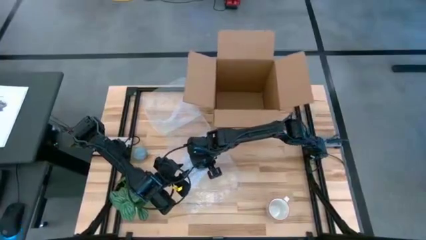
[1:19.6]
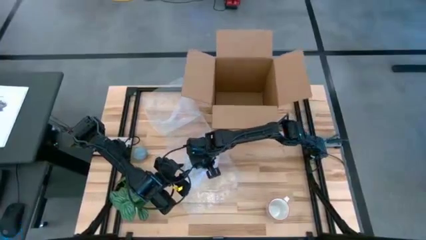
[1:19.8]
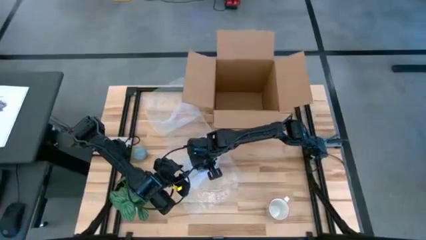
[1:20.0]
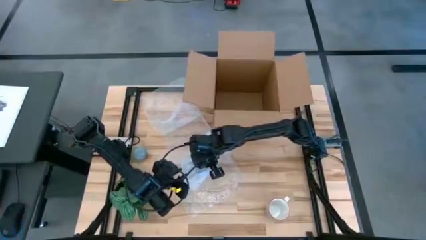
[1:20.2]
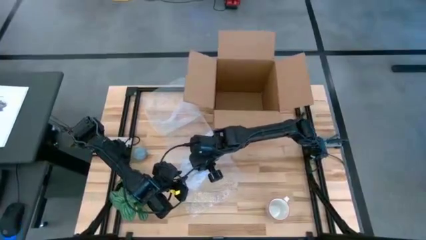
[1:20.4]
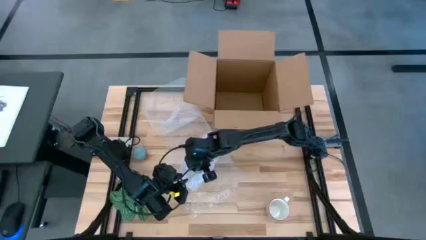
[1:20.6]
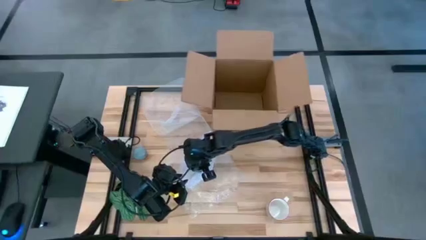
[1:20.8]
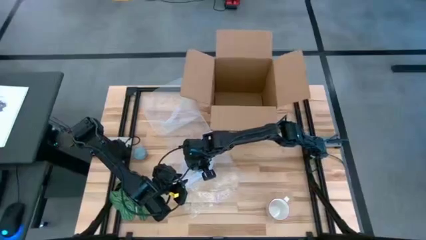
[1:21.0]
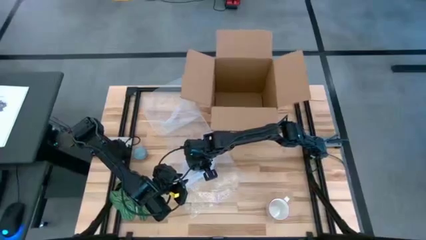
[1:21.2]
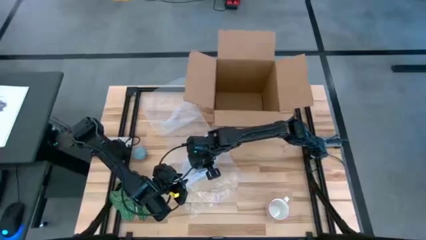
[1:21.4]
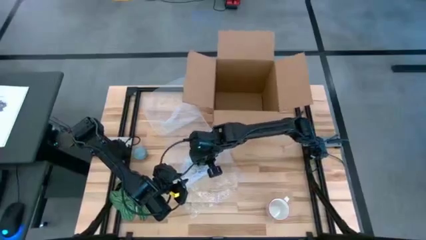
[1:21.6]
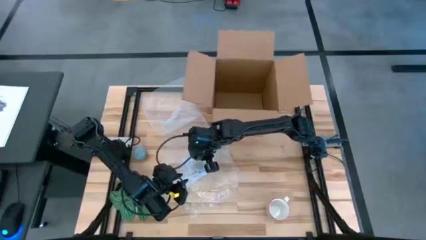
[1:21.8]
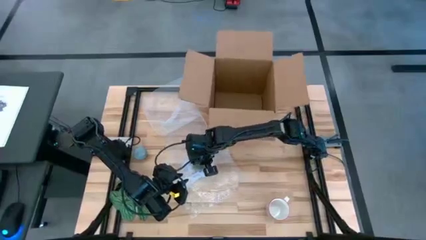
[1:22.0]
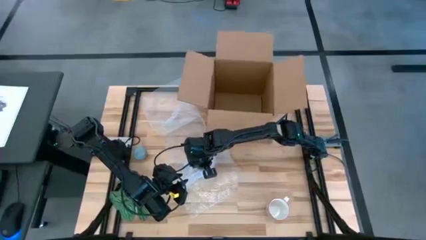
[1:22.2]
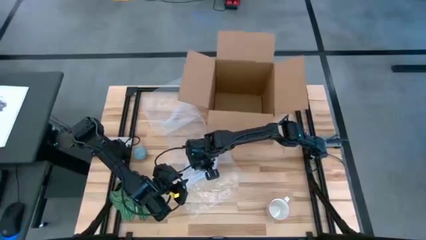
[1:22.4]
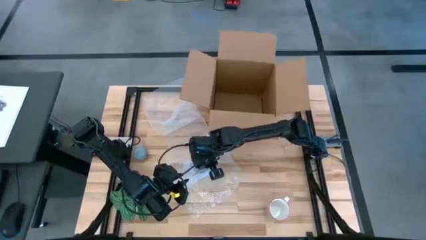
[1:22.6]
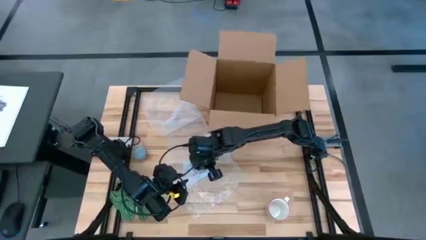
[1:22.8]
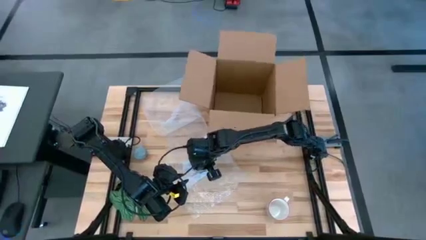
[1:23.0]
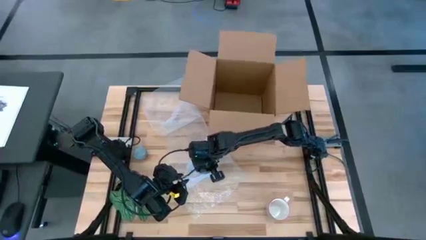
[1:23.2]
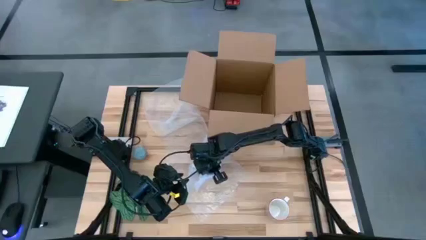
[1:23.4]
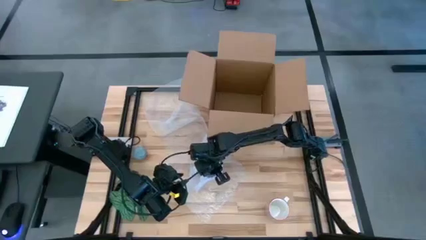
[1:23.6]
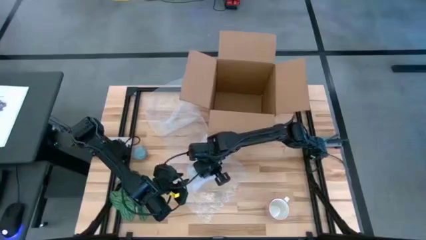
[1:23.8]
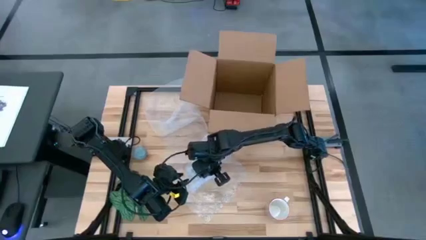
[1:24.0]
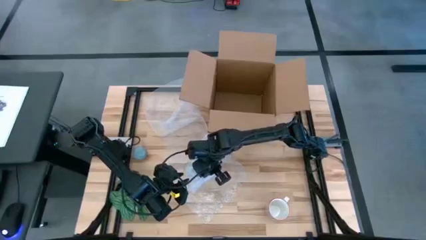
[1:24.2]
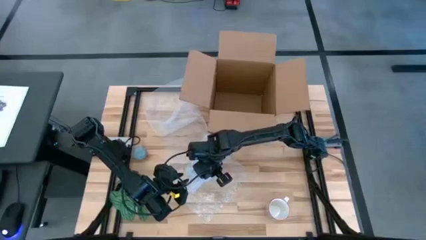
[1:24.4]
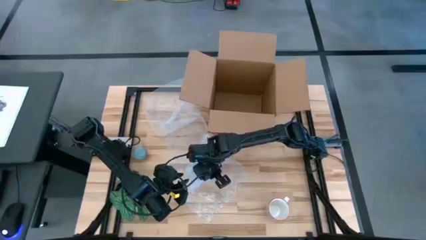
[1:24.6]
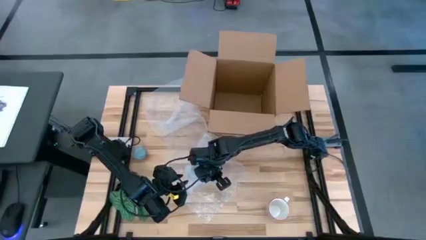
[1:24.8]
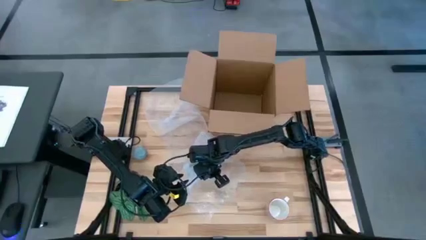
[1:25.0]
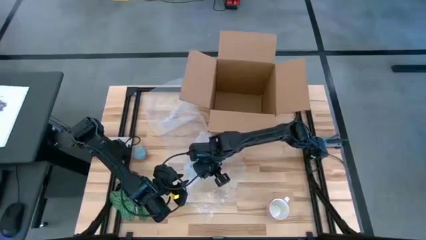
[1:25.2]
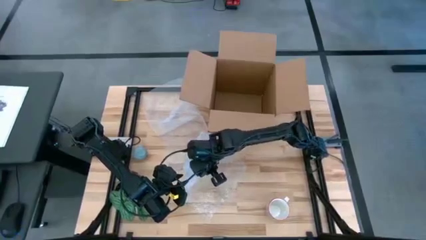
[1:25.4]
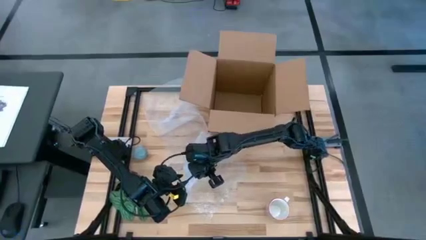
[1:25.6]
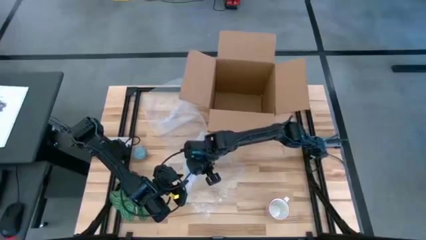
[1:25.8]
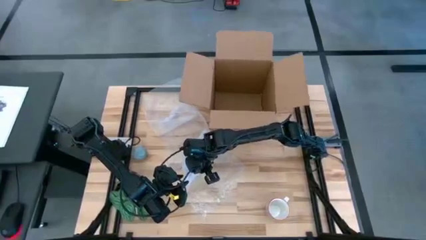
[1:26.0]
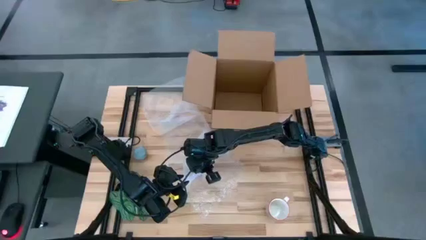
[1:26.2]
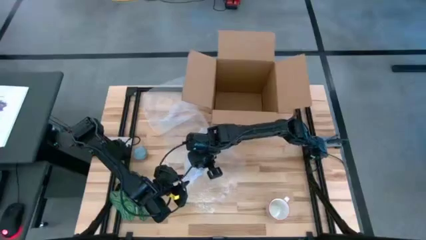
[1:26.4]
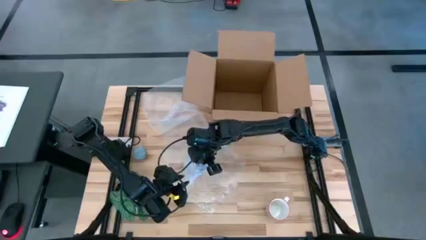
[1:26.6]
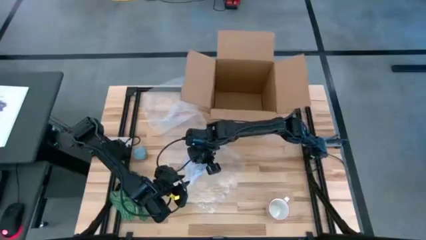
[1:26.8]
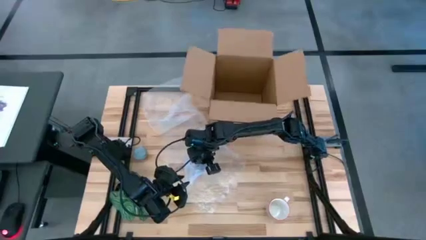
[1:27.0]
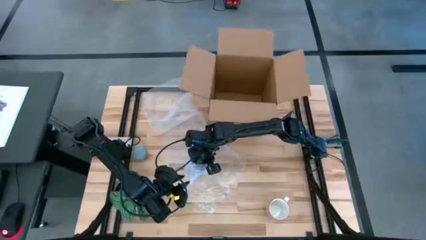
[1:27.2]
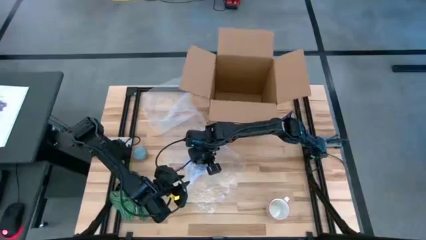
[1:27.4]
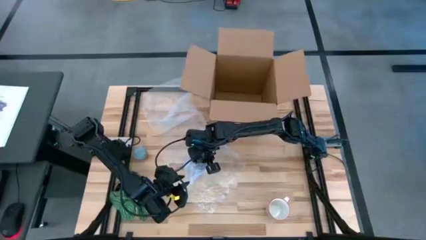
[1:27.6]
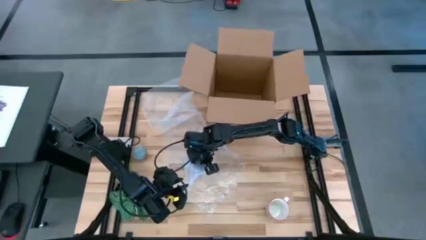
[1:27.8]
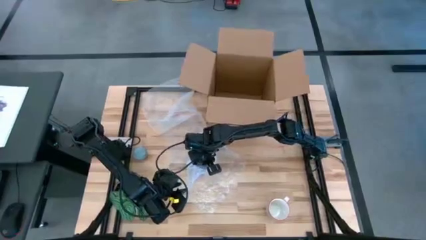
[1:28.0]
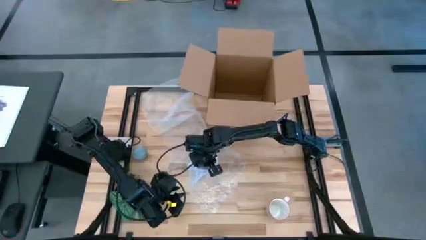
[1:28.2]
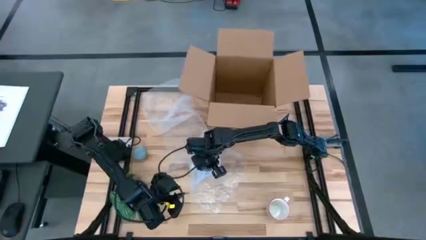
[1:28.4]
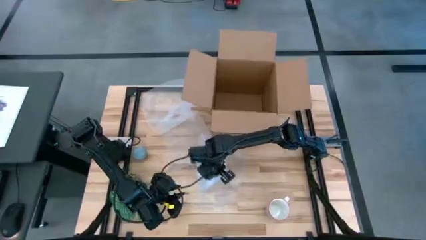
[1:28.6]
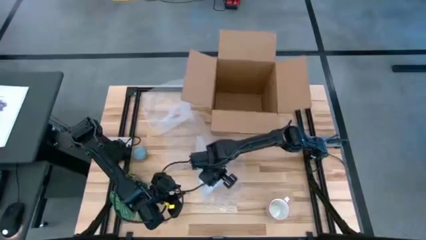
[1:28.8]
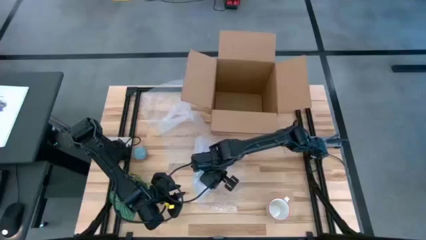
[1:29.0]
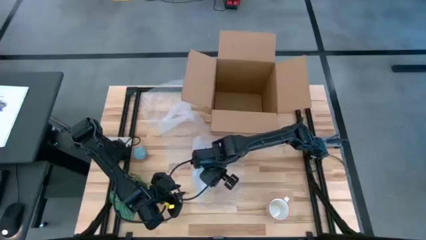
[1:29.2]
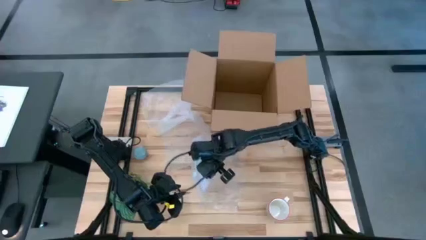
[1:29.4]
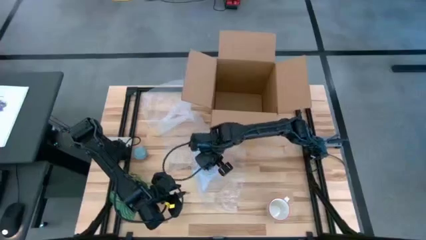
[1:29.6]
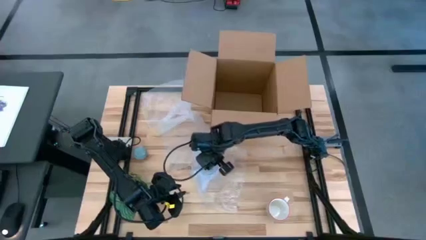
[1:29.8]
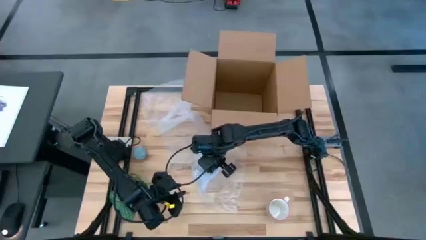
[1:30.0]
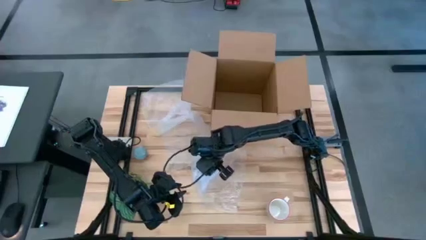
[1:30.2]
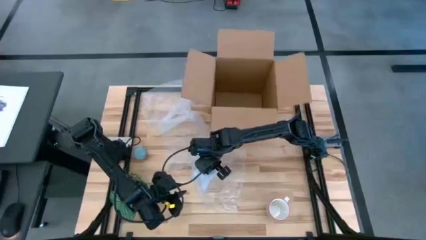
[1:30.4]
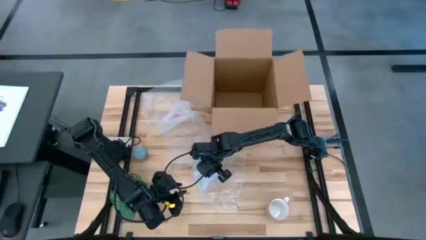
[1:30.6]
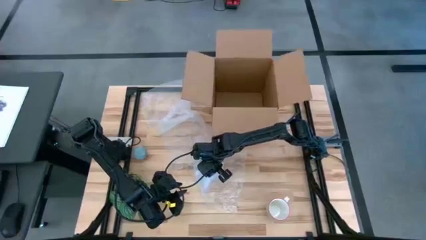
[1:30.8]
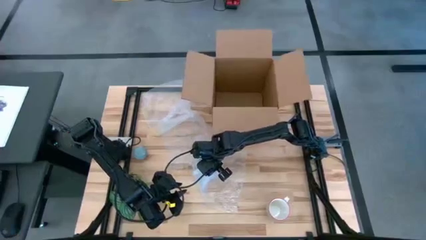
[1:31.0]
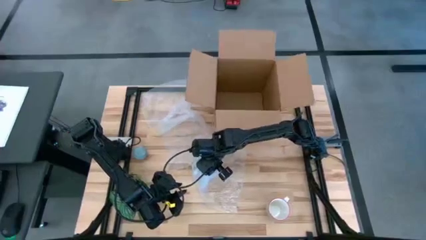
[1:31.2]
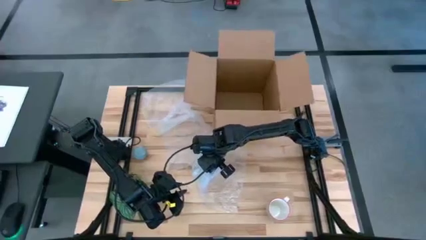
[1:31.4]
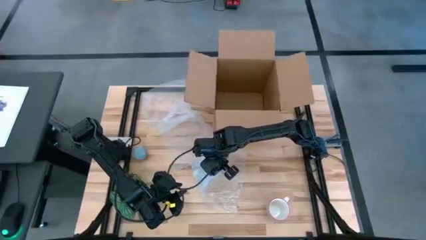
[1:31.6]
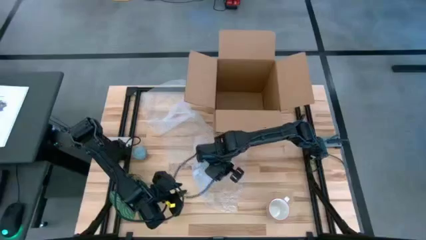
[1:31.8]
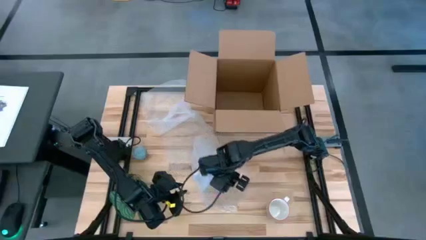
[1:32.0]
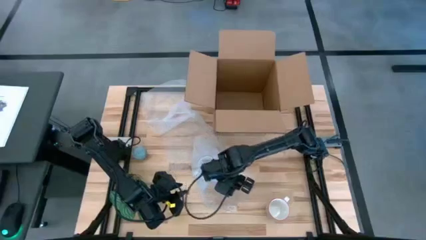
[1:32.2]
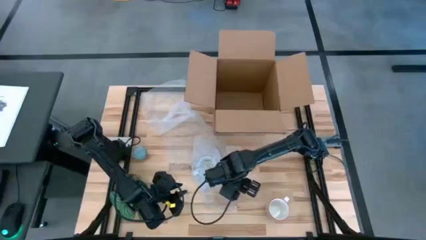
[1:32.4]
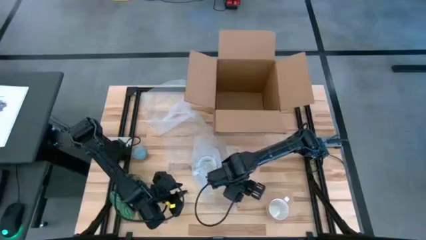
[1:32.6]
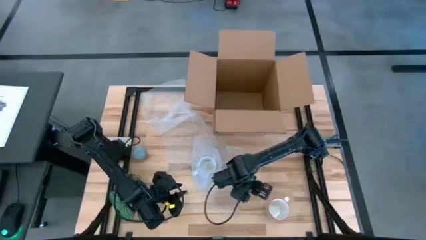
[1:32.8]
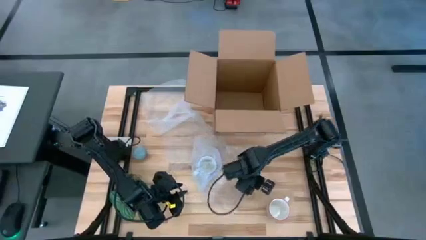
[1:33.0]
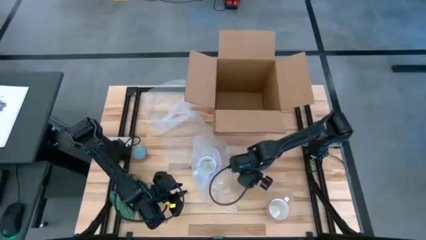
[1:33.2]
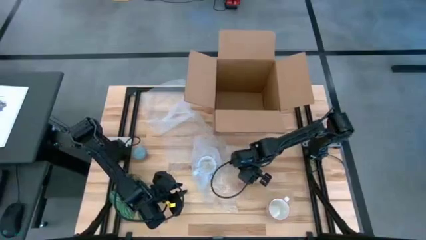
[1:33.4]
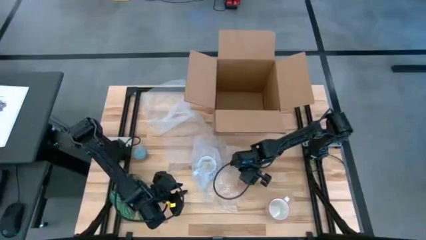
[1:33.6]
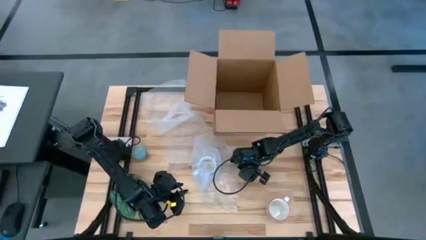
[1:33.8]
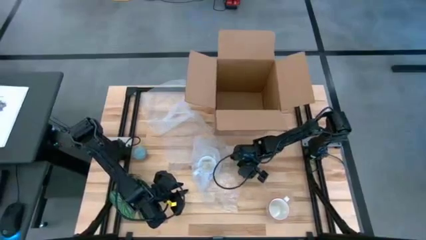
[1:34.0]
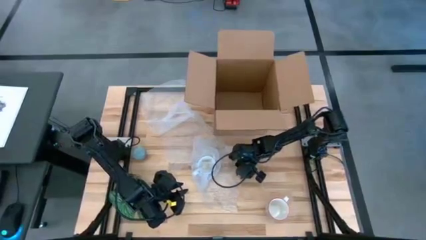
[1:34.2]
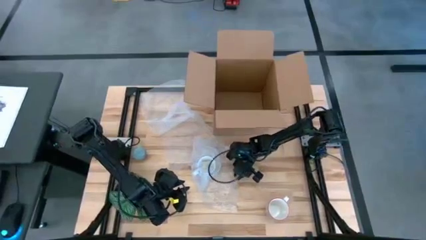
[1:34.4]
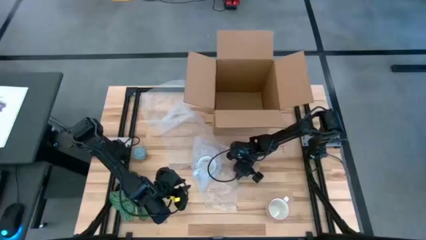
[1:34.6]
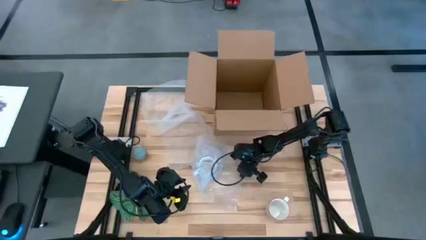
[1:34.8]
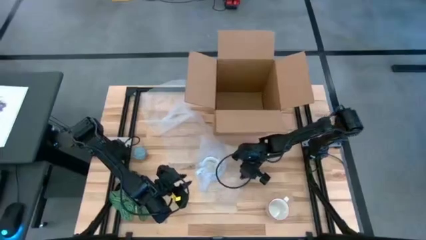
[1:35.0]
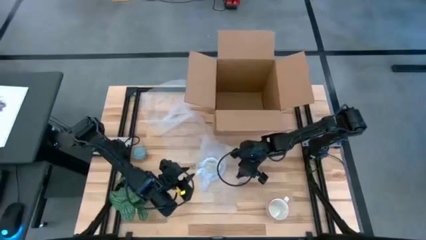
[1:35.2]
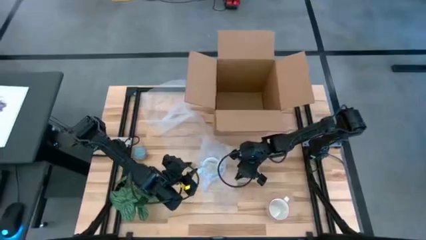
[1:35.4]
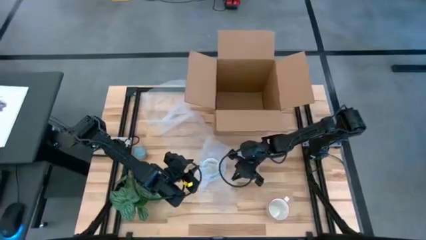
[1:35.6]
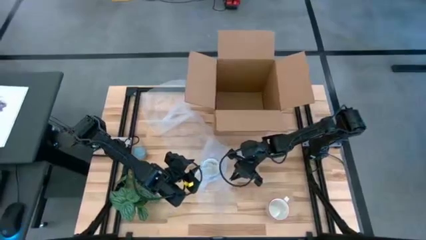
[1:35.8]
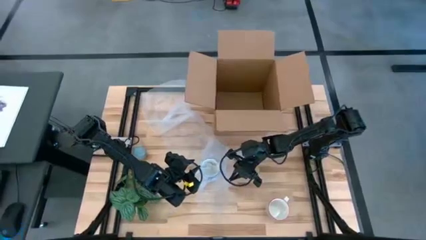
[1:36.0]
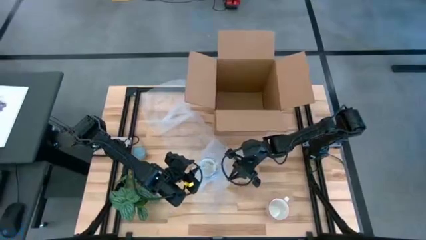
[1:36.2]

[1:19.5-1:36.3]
Task: wrap mug
Wrap the white blue mug with bubble wrap
